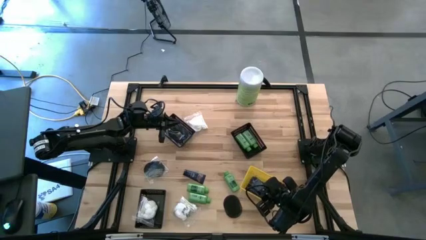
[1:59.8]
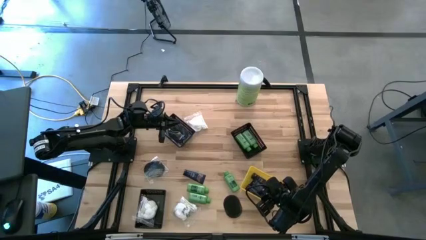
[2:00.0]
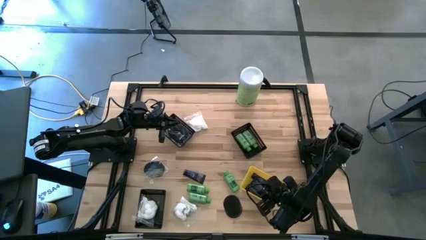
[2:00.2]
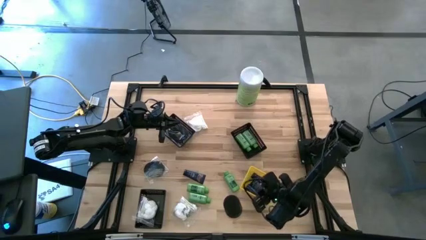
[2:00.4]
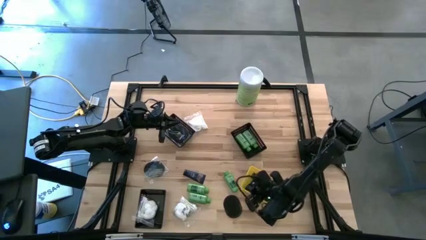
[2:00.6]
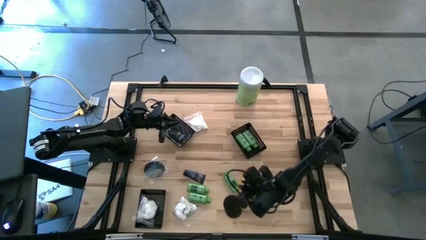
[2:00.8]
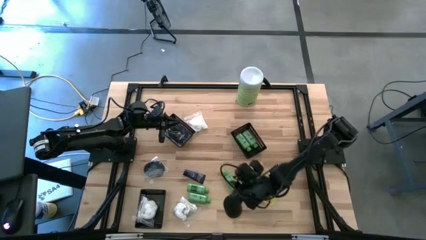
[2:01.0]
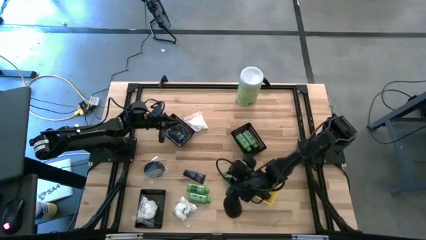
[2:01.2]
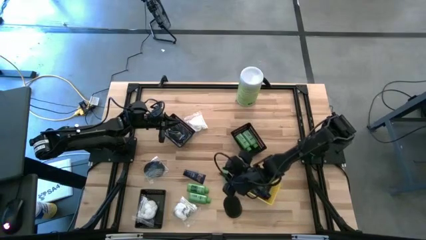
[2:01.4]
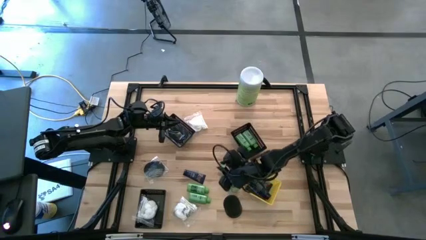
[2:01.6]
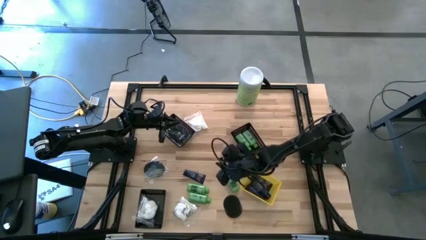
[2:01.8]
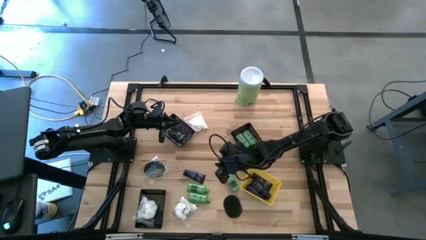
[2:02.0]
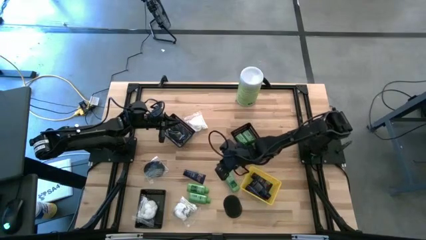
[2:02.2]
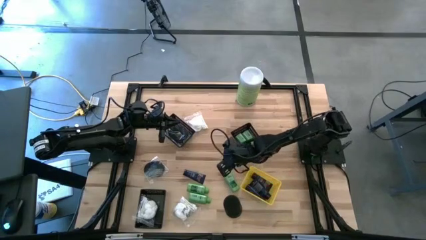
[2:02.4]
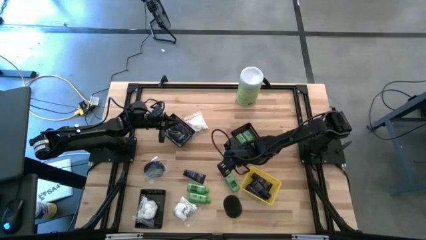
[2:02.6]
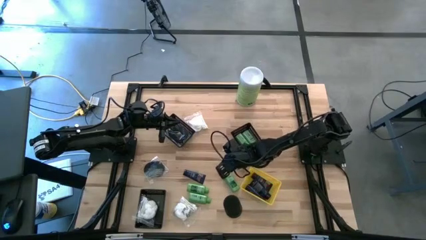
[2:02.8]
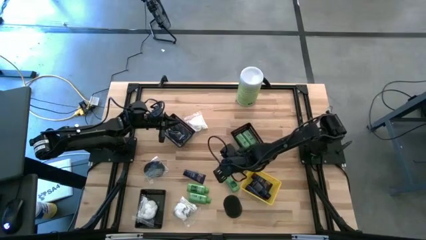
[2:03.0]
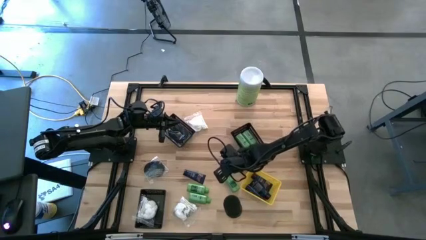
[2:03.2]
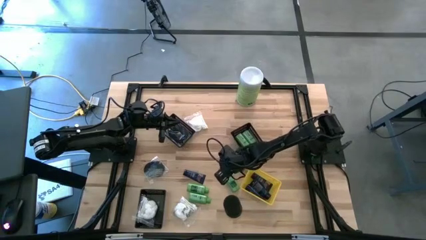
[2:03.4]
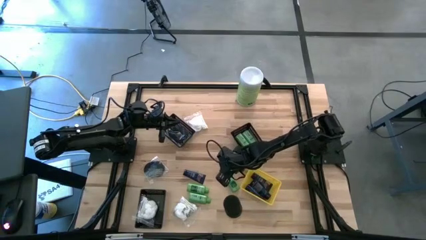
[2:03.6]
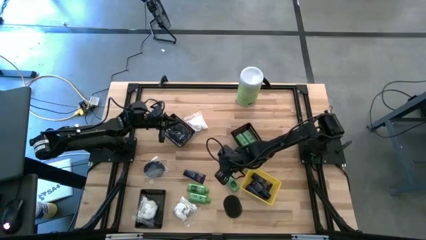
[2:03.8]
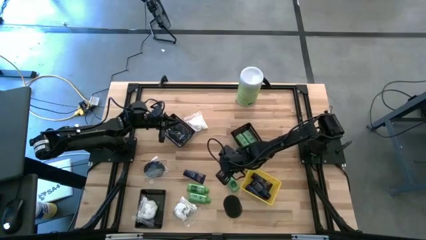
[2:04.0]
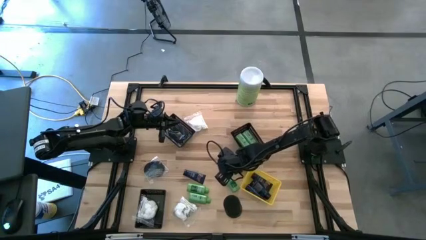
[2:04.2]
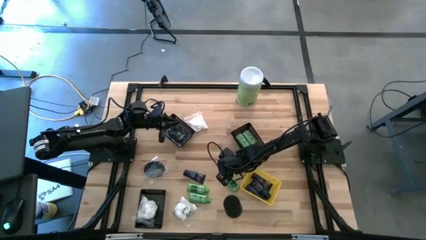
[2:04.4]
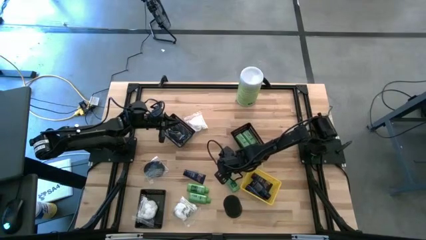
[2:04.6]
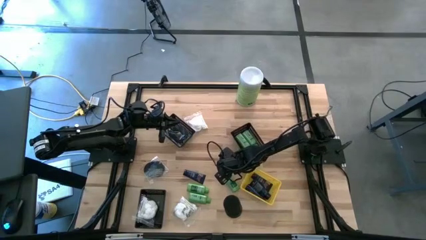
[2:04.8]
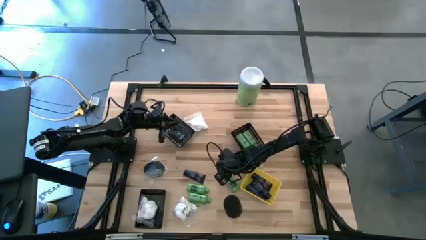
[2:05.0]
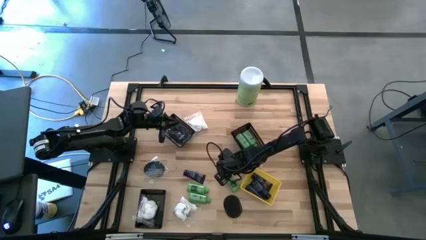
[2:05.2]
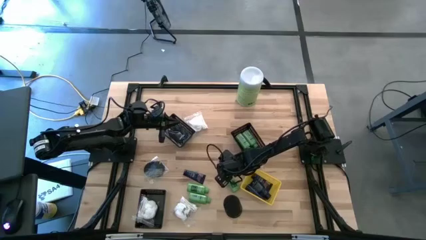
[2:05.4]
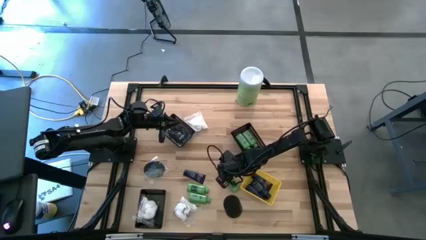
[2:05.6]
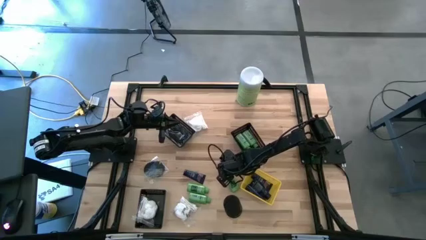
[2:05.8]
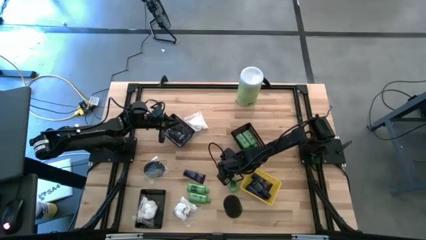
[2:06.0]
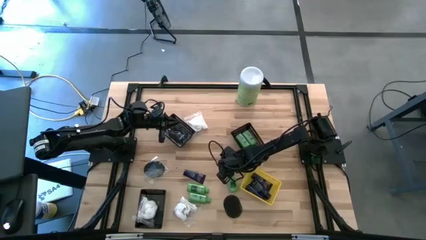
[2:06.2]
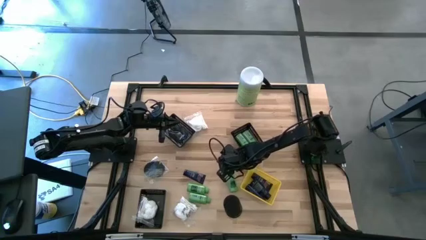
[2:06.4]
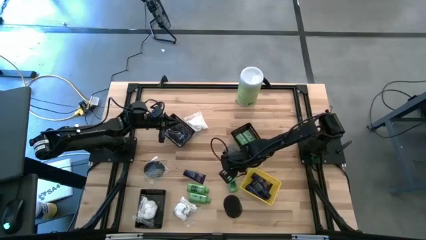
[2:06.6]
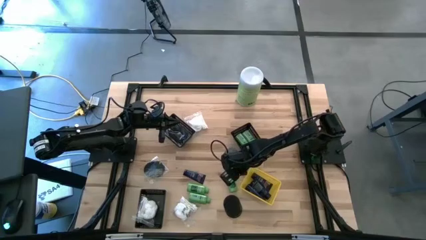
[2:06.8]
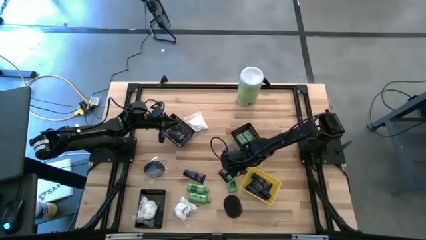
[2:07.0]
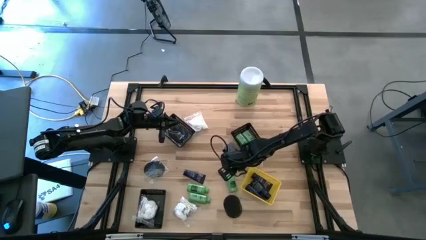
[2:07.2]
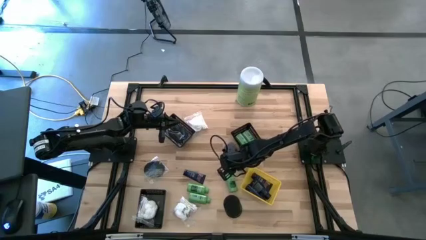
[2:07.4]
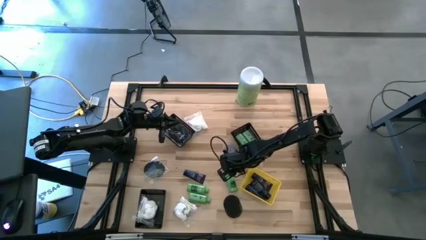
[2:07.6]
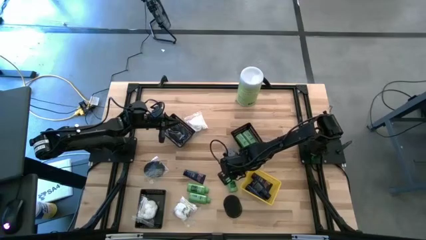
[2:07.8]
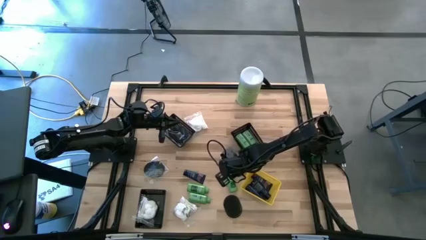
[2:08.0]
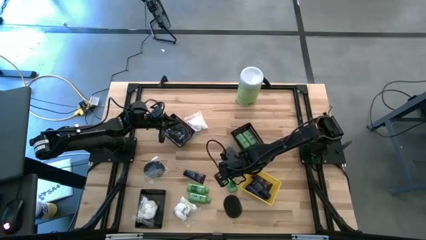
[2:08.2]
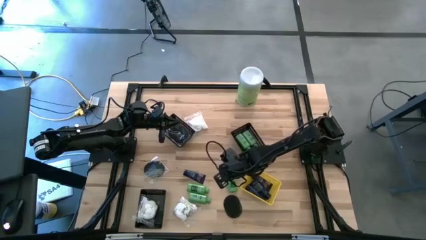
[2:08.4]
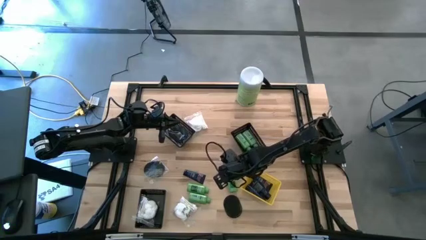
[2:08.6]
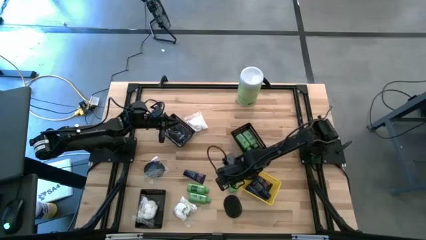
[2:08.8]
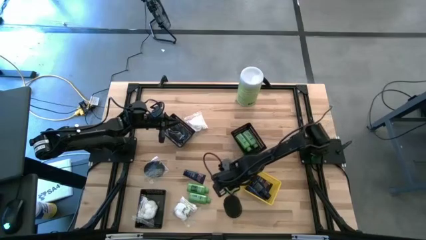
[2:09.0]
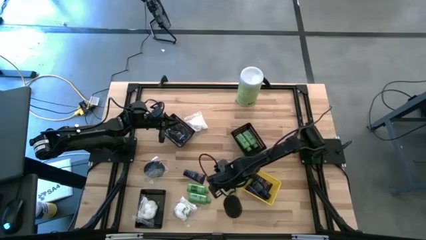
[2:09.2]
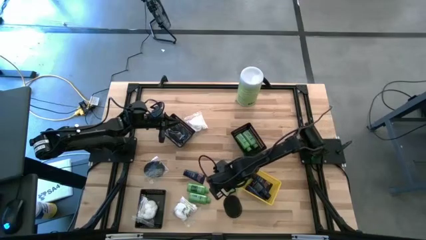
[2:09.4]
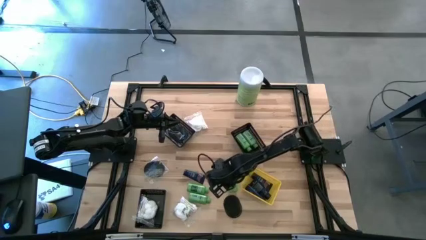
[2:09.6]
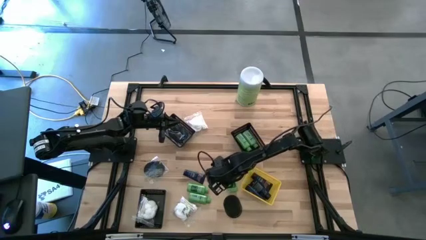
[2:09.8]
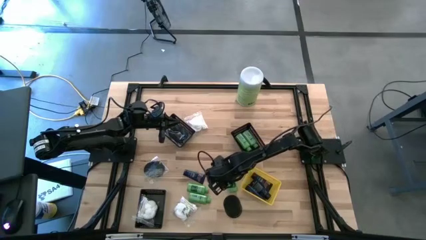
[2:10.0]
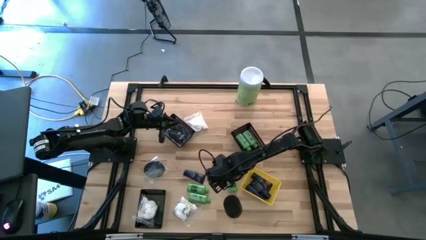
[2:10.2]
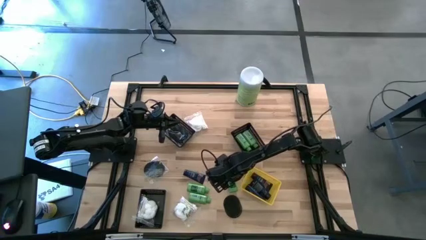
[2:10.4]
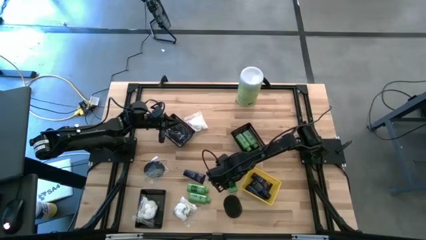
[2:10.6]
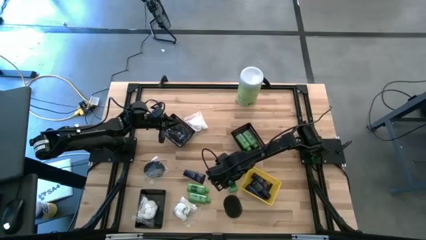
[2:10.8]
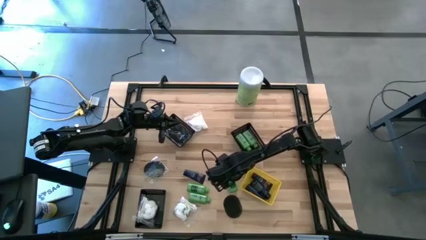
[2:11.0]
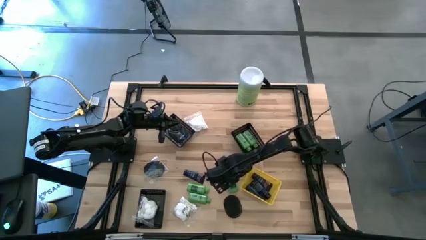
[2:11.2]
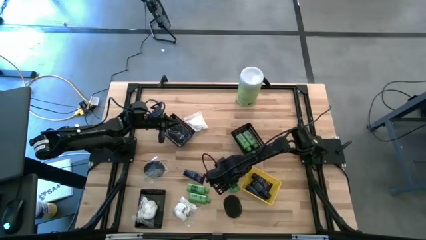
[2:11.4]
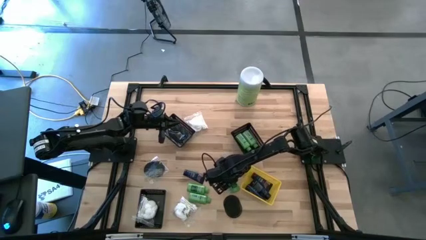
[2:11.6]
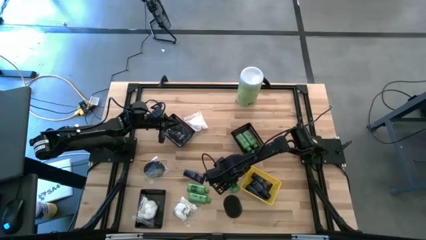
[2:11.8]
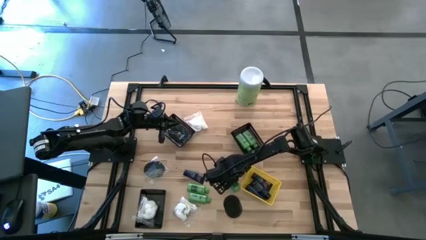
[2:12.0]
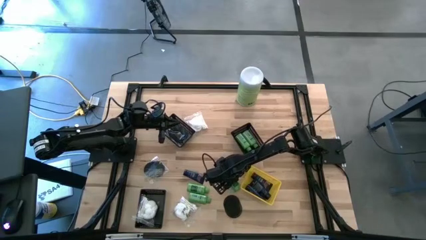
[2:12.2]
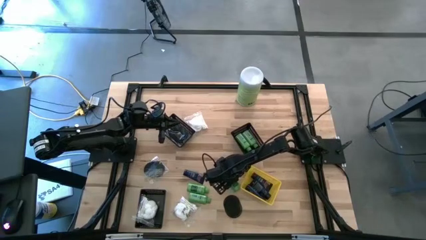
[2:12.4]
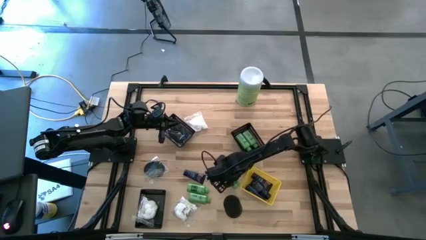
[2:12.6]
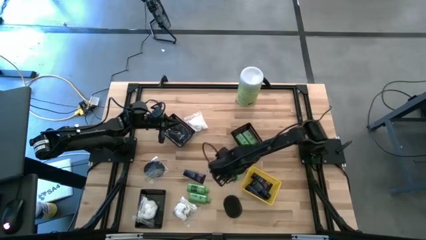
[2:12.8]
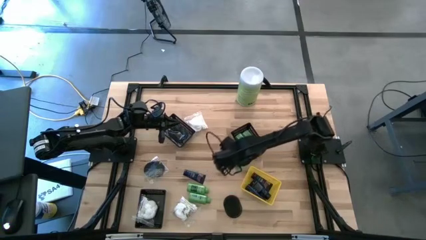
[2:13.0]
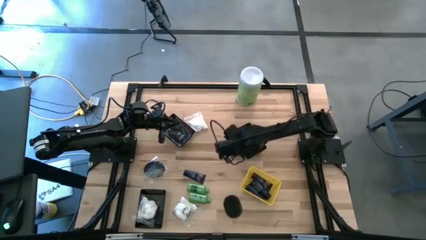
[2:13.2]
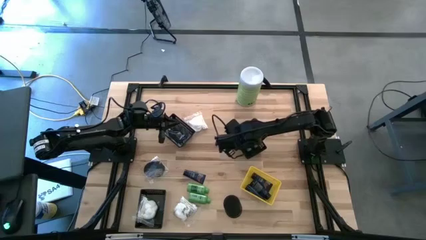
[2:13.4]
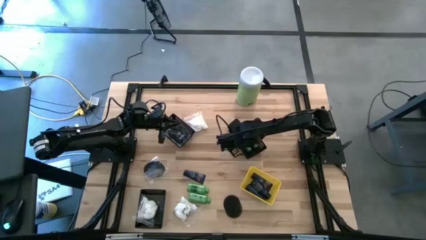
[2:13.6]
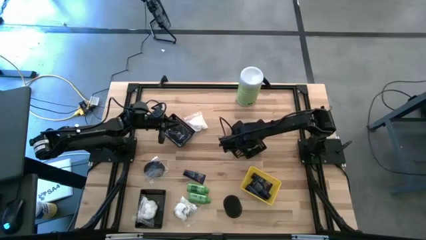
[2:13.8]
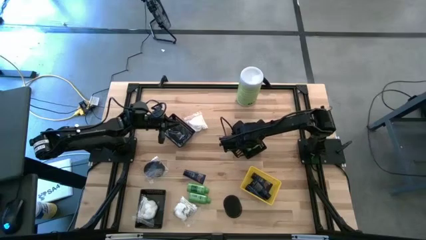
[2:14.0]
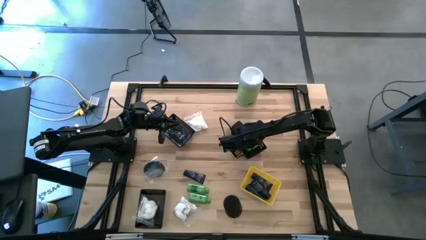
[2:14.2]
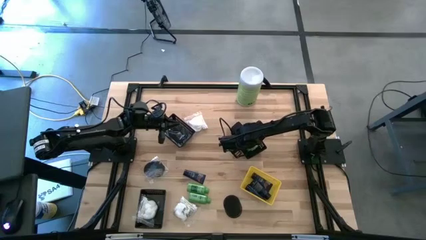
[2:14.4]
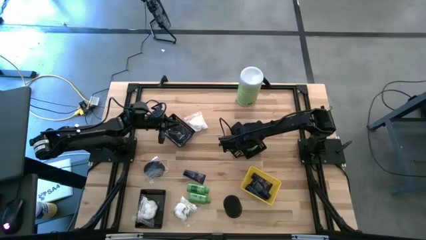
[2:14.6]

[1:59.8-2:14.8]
Task: Pick & Place Travel size toiletries
Put the shampoo bottle into the top right black bin

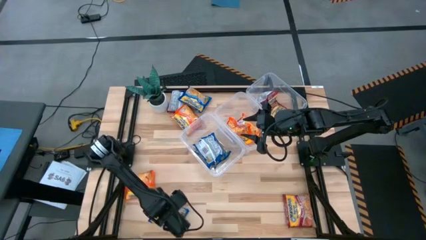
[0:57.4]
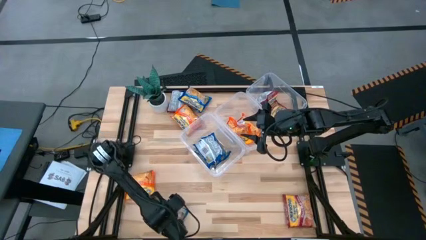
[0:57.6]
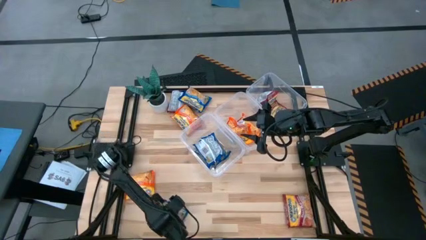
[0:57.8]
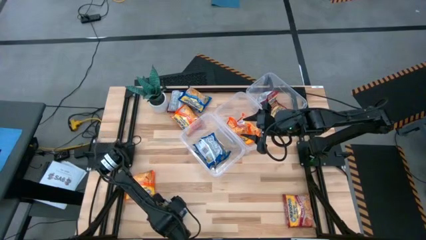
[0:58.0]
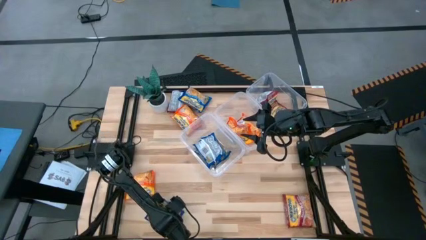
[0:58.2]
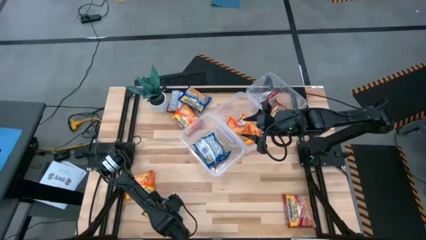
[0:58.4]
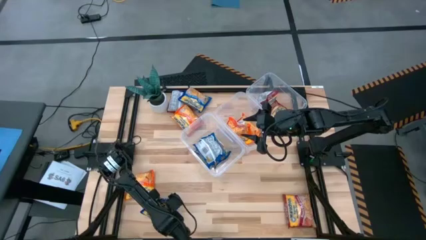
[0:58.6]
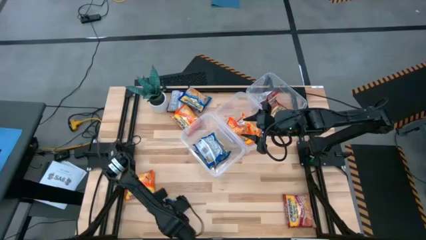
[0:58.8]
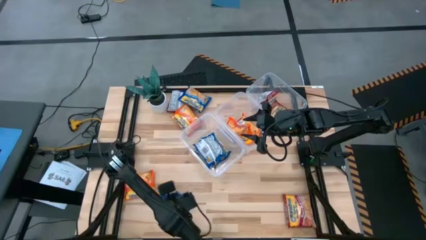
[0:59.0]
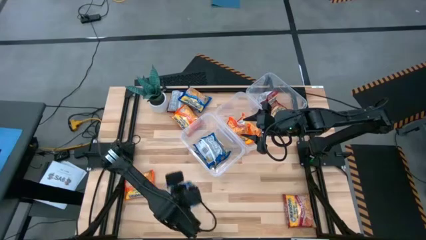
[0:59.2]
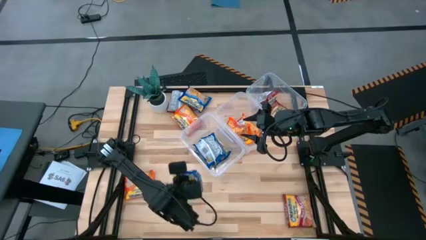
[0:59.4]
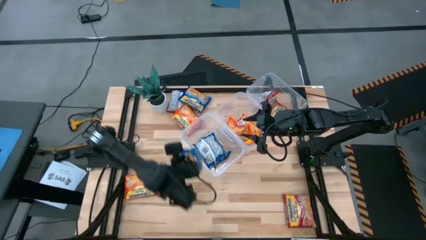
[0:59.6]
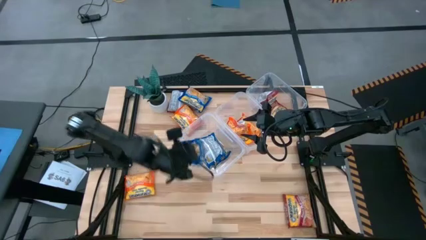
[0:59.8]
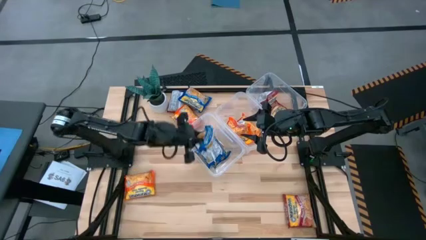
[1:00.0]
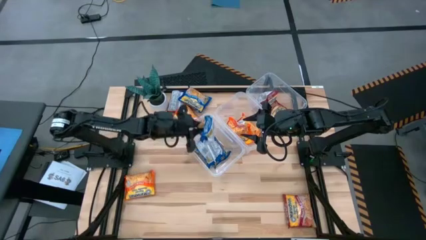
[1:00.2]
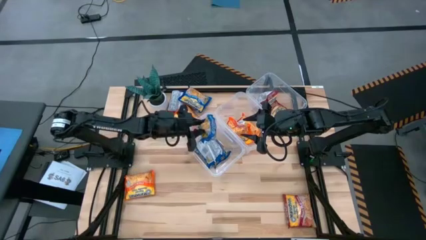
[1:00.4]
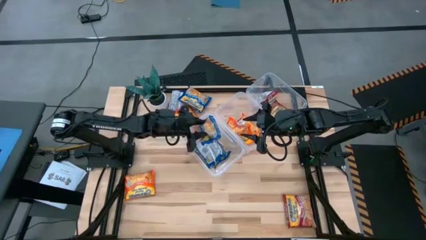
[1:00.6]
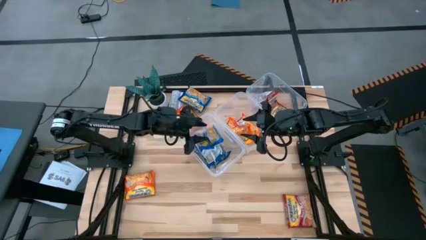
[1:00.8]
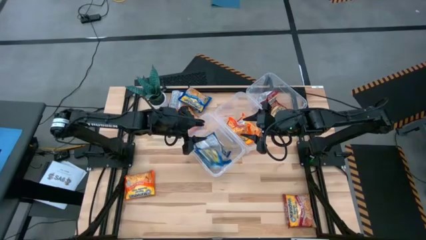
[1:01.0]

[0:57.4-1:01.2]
Task: Sort Maruchan noodles
Put the blue noodle pack into the left transparent bin
